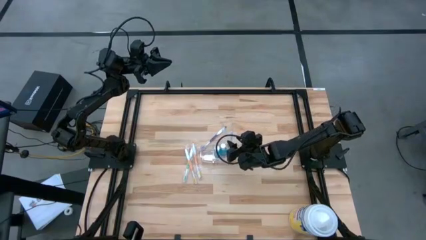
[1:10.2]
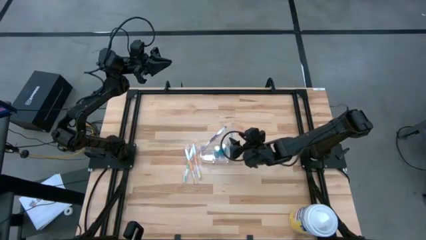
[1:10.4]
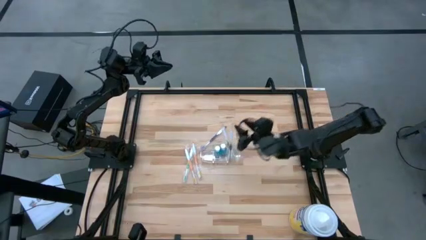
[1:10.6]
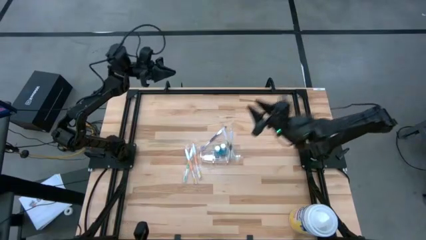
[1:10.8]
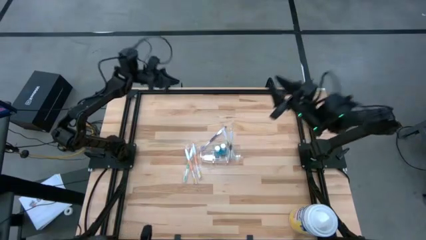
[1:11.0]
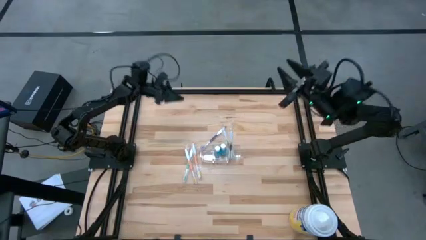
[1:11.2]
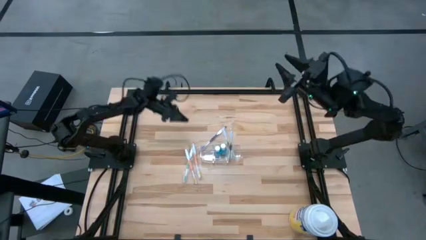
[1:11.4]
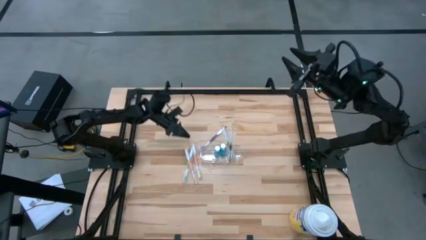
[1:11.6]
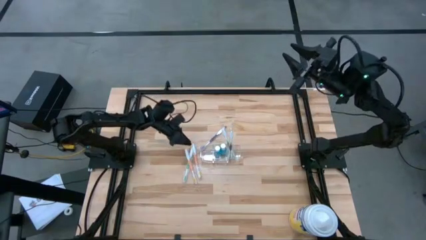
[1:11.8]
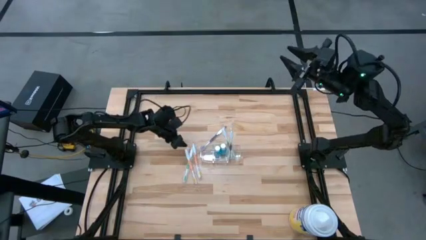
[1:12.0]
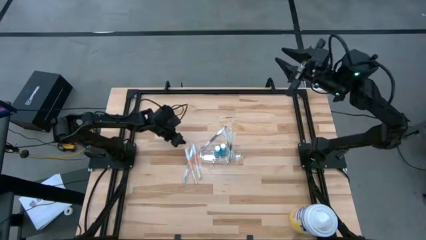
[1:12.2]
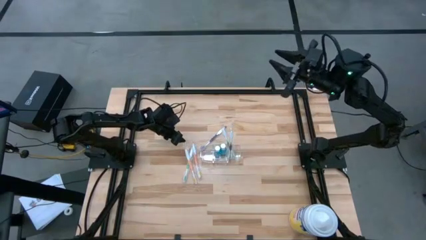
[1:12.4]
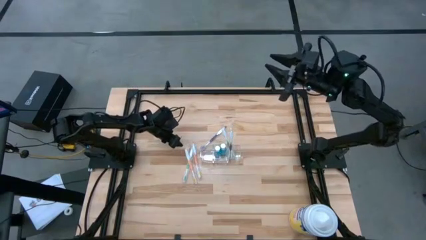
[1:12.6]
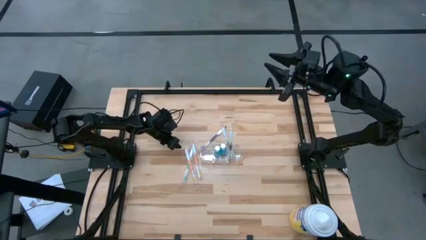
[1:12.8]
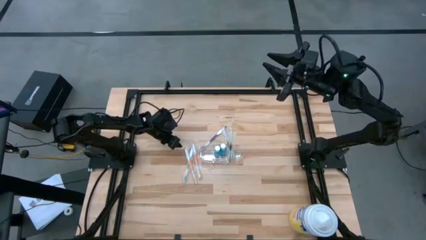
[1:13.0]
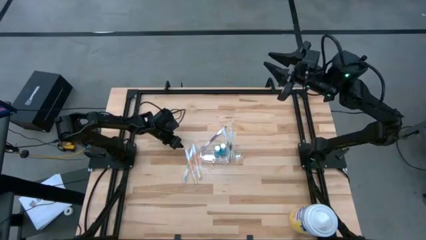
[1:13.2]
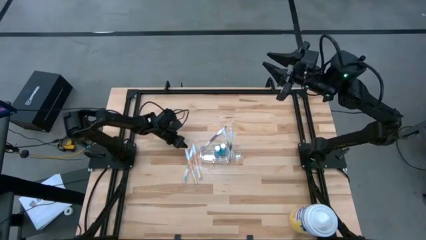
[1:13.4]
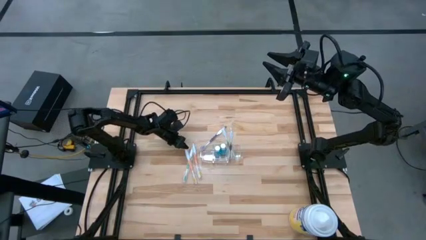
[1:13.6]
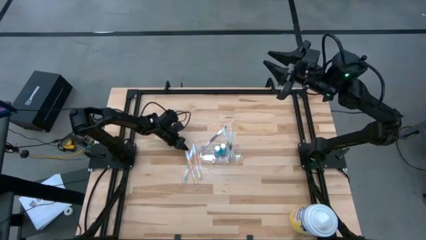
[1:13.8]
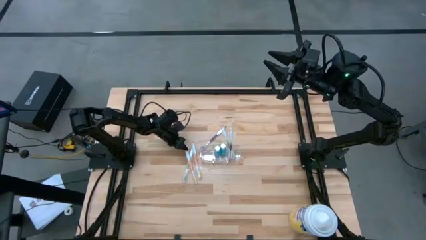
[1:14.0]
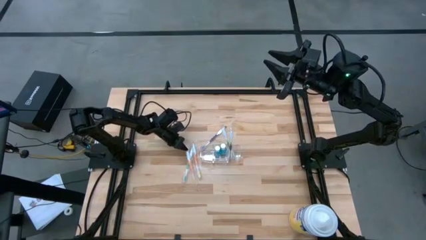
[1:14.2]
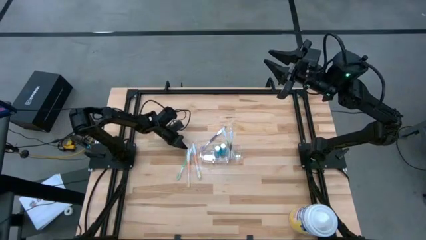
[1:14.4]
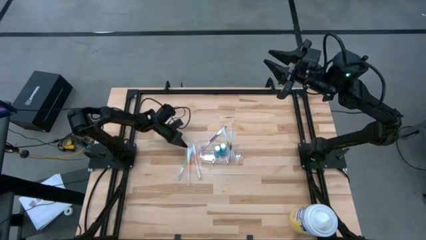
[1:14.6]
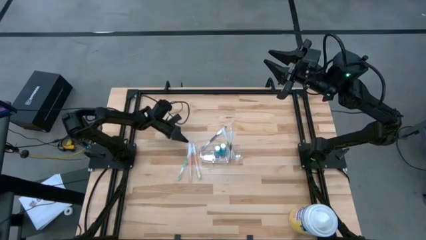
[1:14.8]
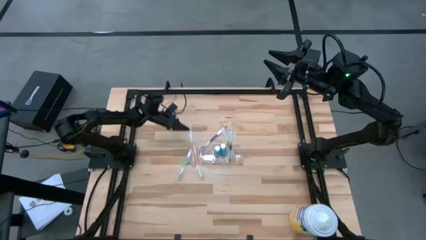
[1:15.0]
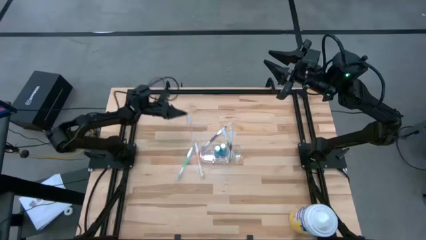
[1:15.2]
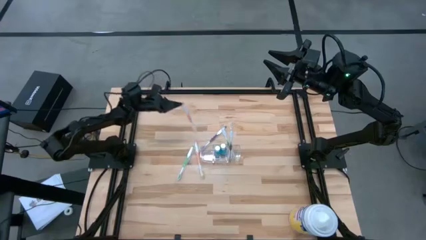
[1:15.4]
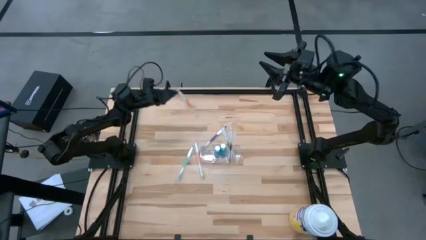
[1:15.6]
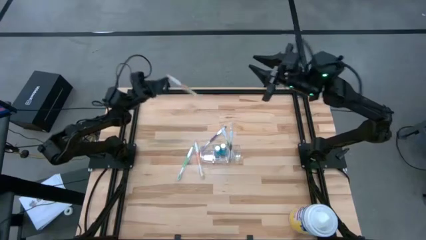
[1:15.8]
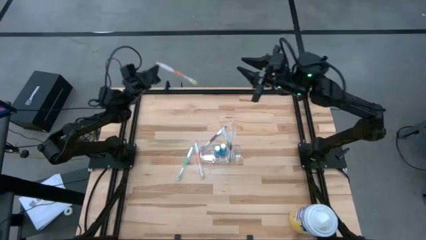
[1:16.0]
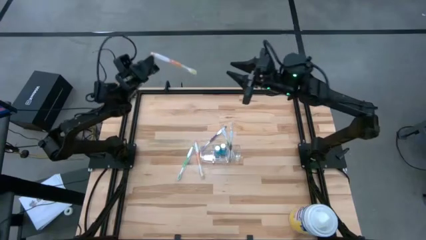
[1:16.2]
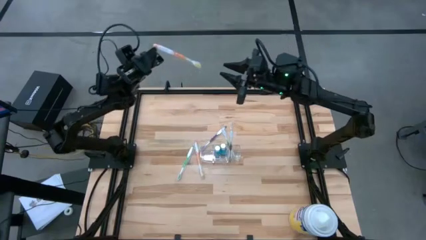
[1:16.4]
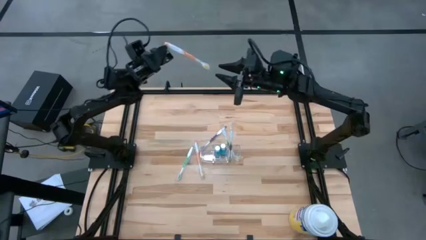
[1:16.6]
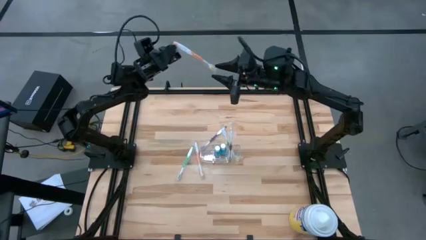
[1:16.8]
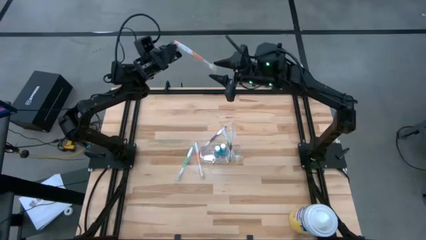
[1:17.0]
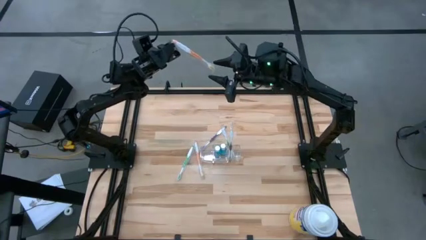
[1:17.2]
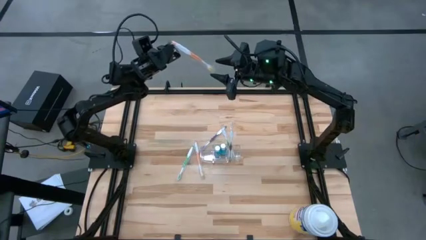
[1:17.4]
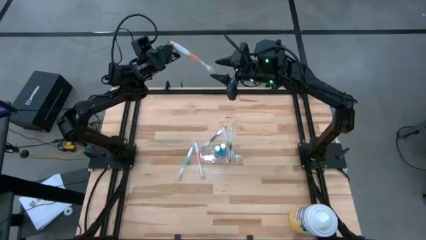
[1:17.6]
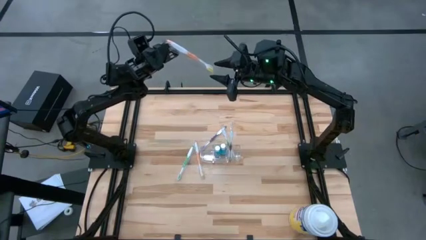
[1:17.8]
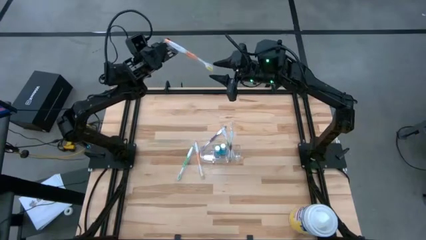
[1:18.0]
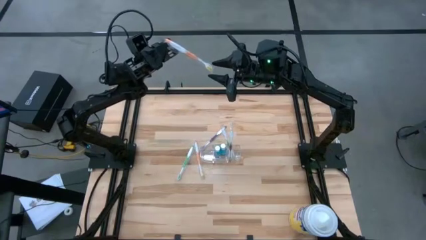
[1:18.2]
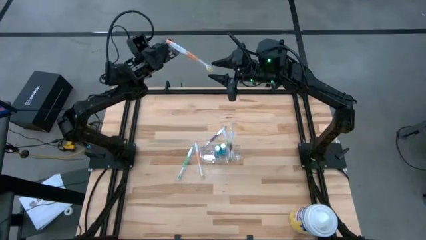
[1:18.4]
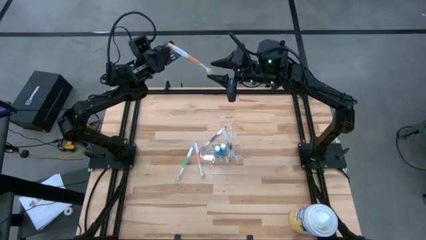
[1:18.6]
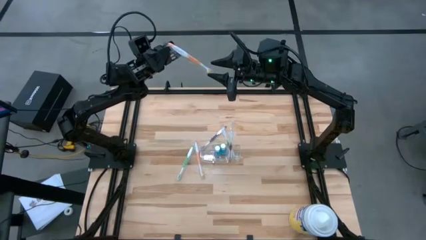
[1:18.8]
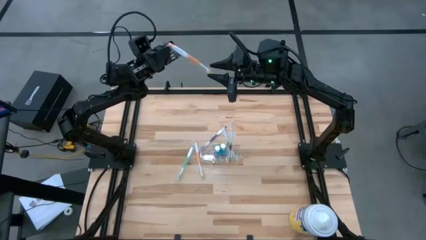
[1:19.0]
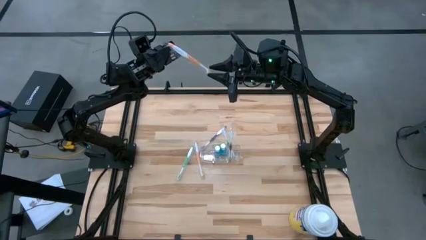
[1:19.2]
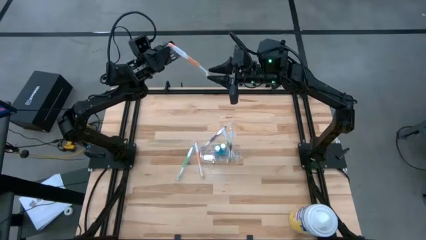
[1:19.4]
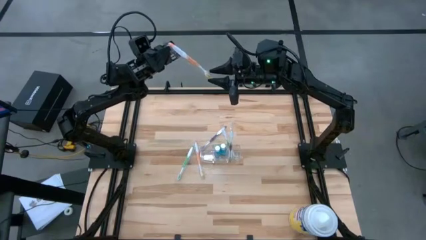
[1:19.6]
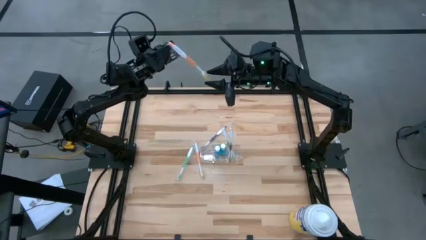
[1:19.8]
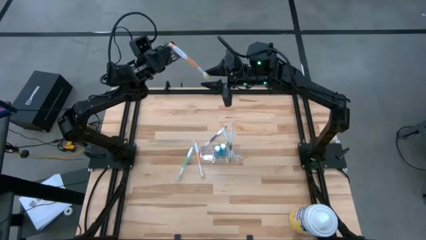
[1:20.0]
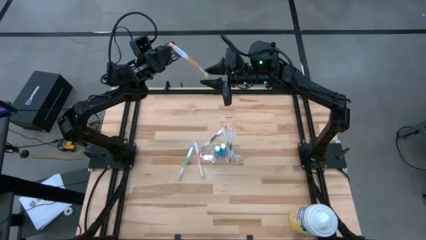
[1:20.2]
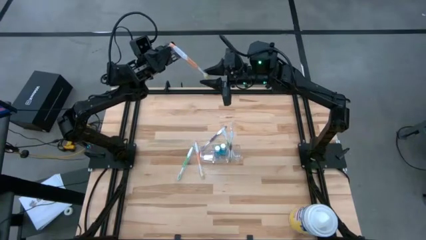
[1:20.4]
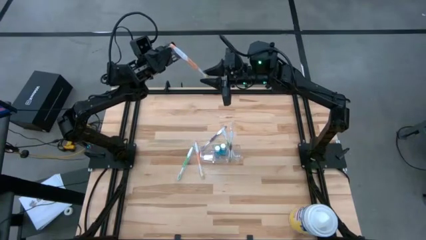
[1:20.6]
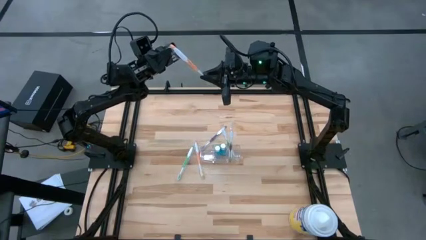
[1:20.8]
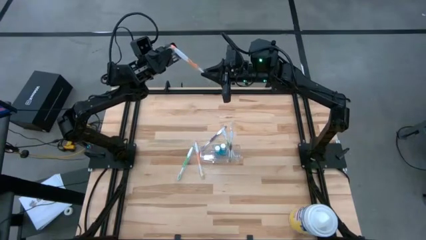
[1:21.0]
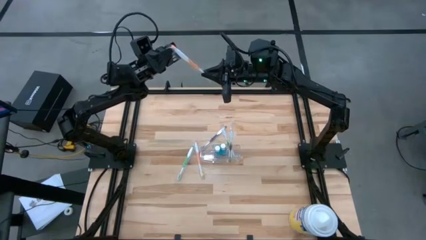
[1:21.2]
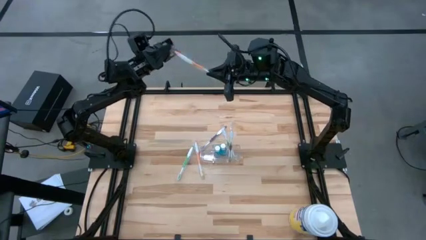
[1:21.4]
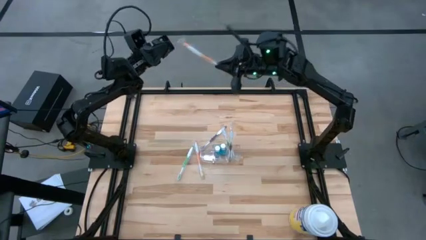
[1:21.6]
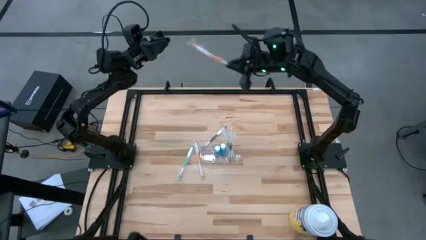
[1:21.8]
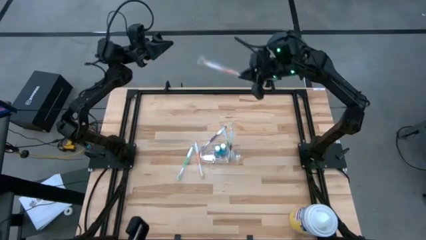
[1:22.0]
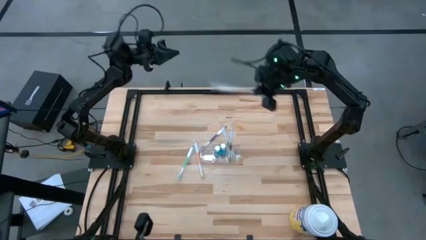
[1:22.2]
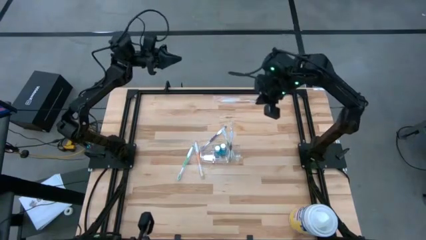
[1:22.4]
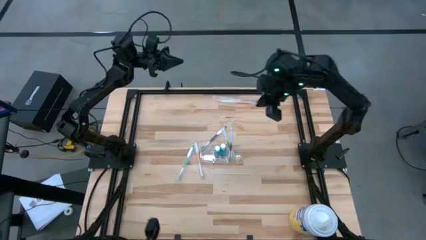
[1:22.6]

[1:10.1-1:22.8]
Task: Pick & Place toothbrushing station
Put the orange toothbrush into the transparent organizer
